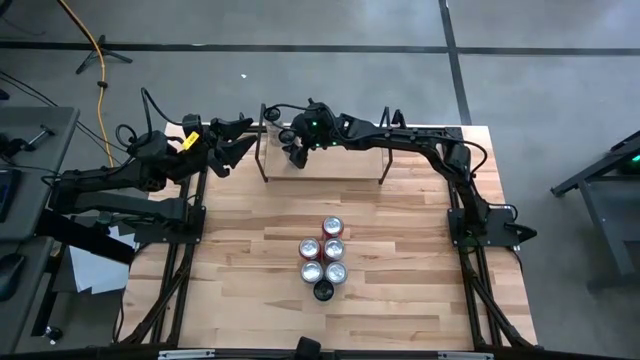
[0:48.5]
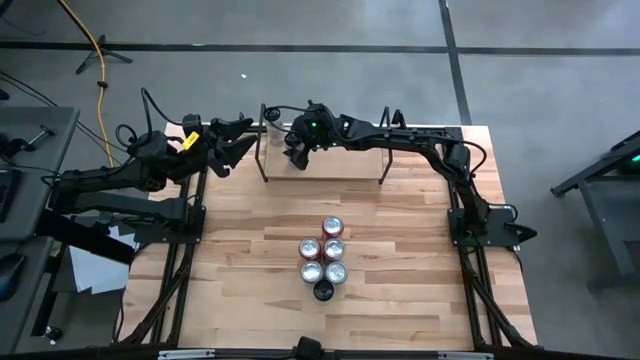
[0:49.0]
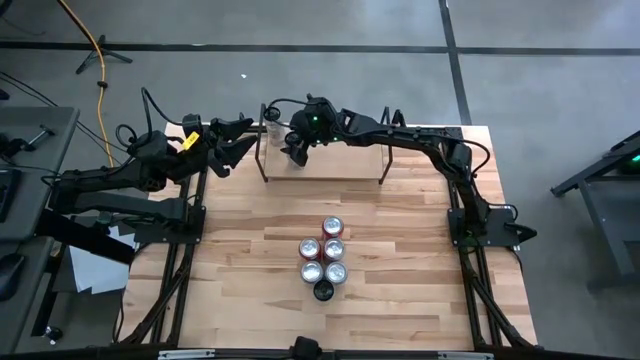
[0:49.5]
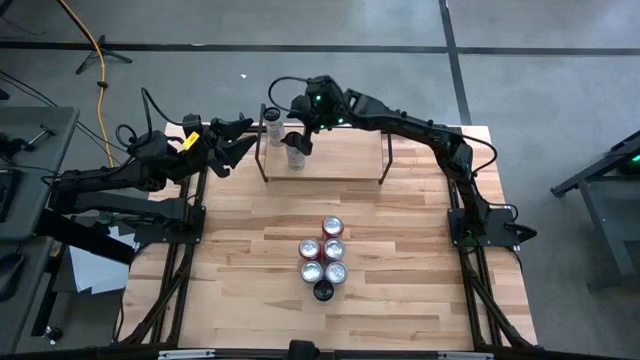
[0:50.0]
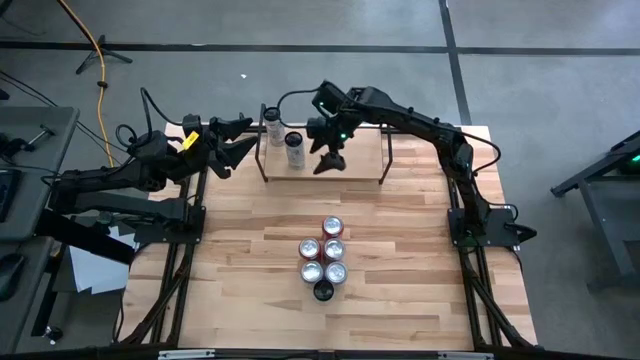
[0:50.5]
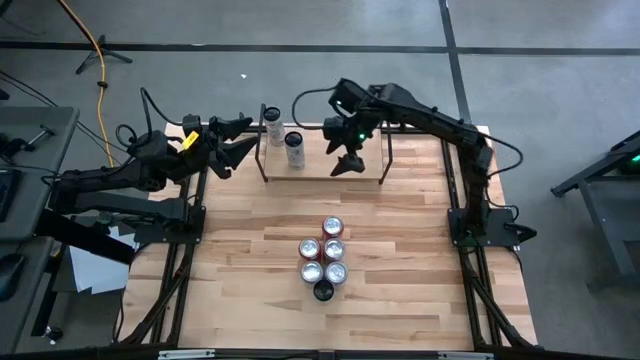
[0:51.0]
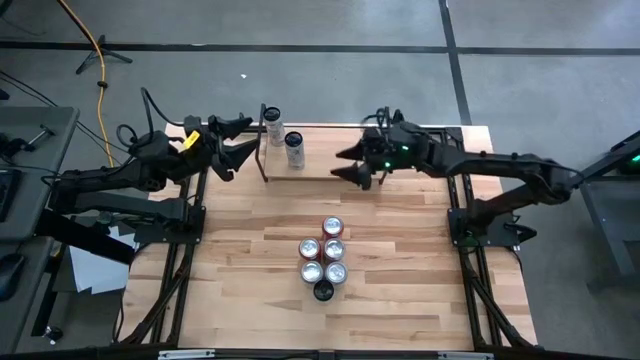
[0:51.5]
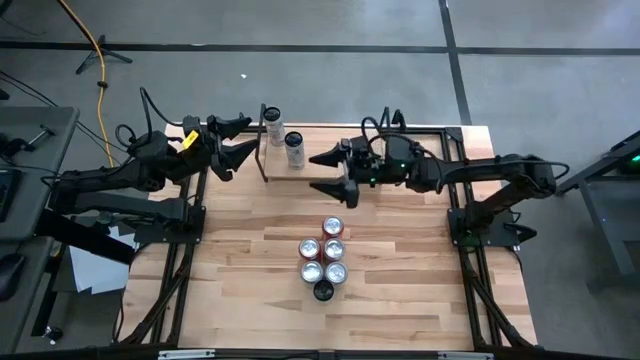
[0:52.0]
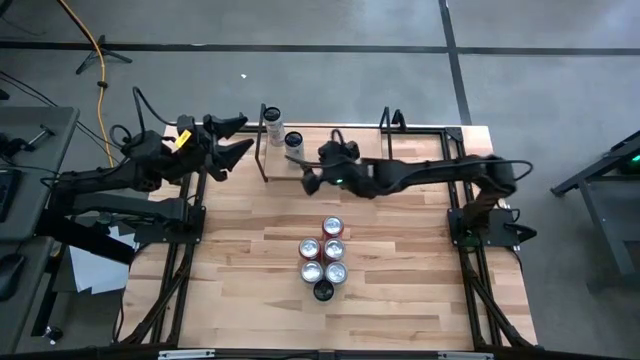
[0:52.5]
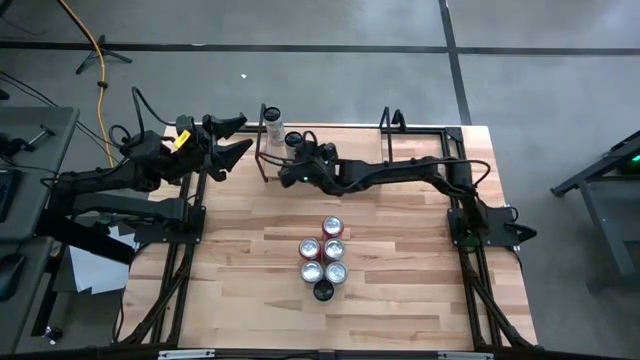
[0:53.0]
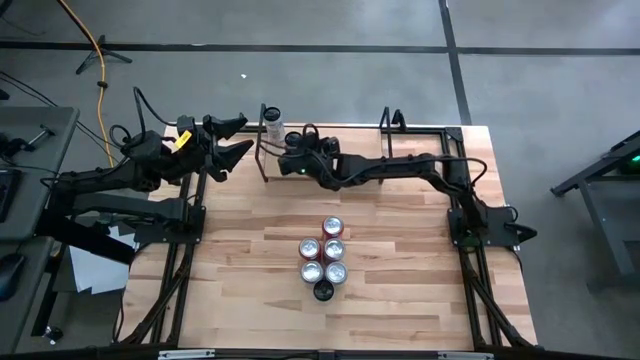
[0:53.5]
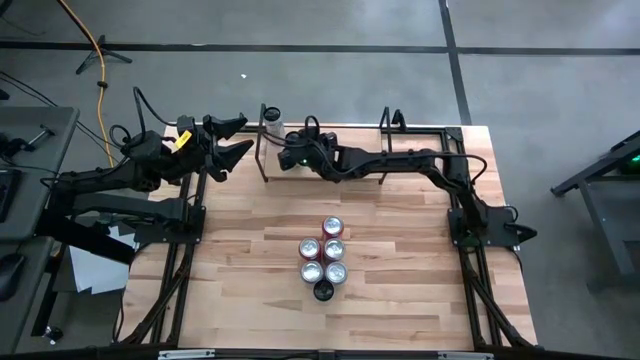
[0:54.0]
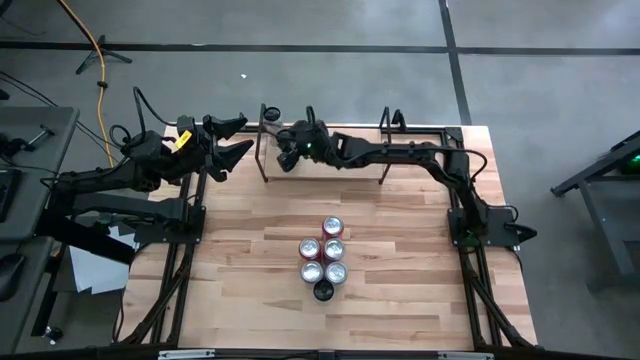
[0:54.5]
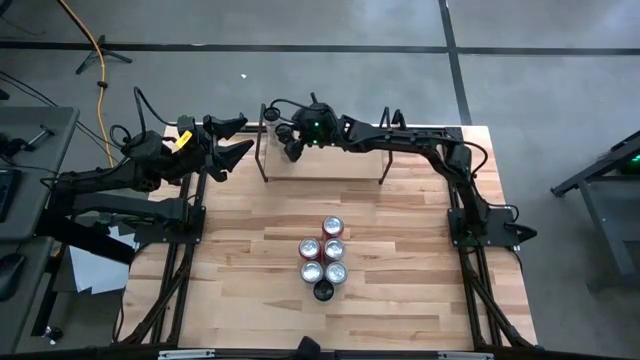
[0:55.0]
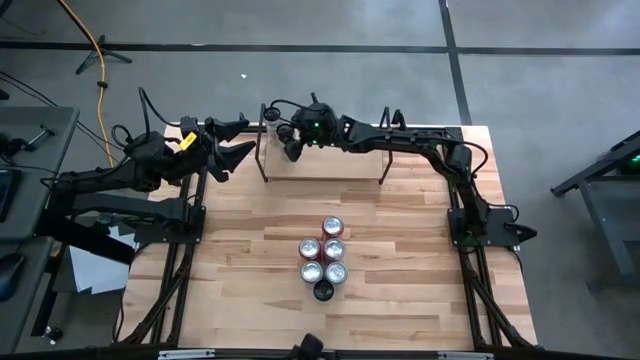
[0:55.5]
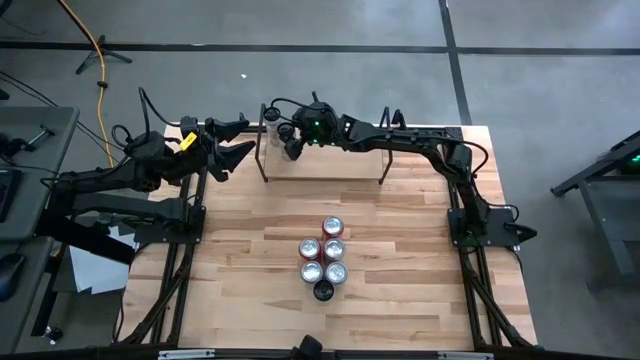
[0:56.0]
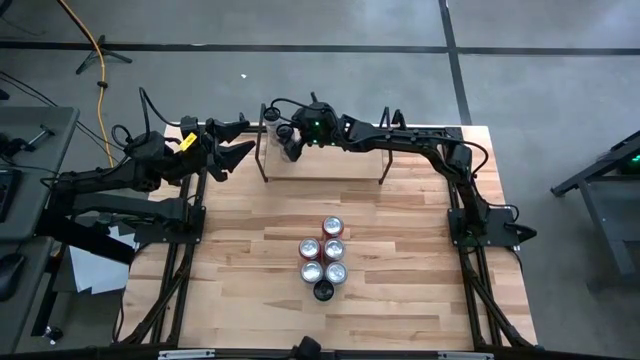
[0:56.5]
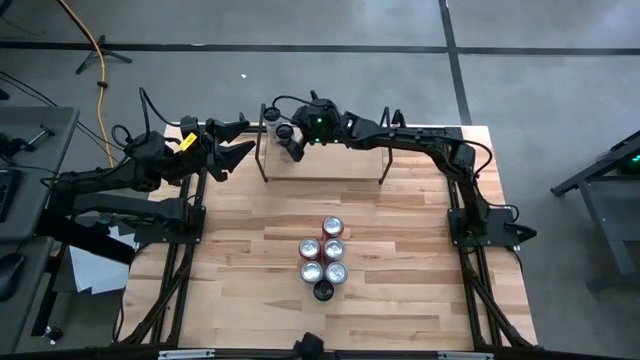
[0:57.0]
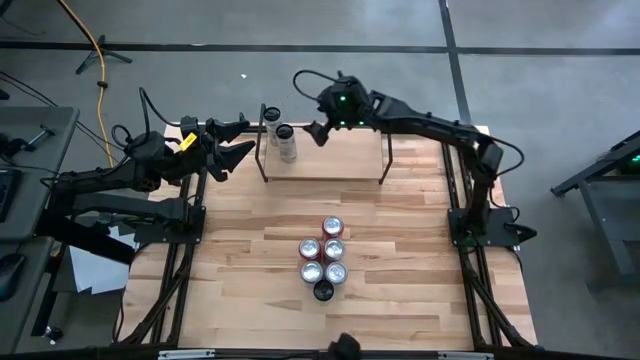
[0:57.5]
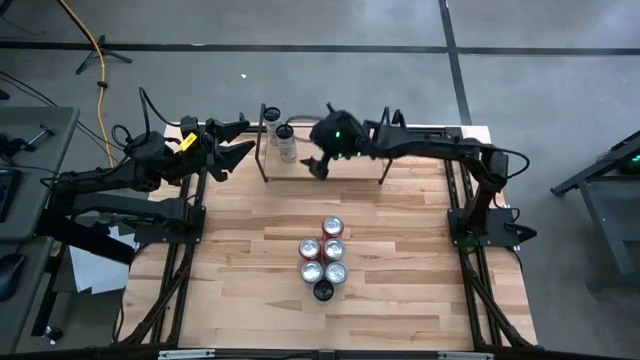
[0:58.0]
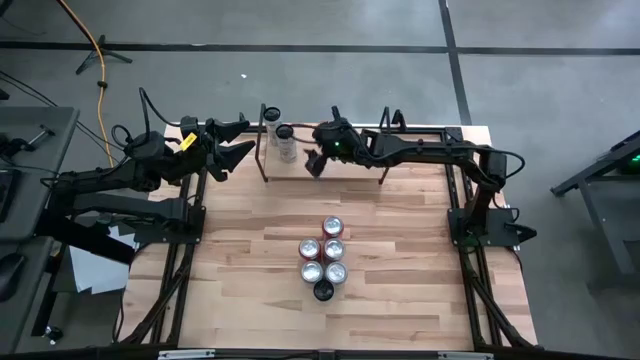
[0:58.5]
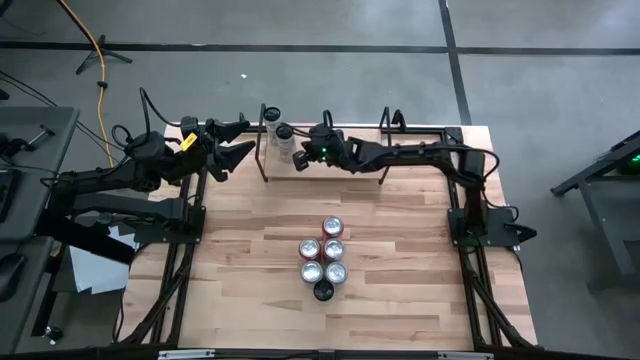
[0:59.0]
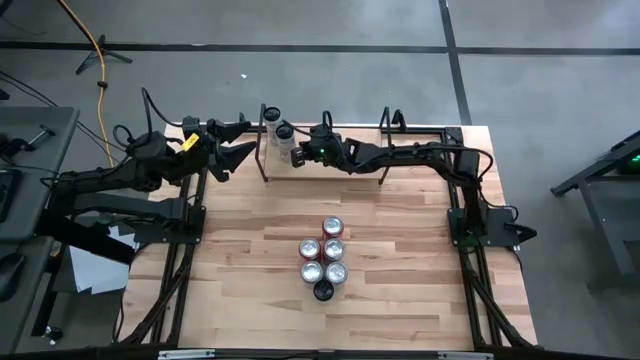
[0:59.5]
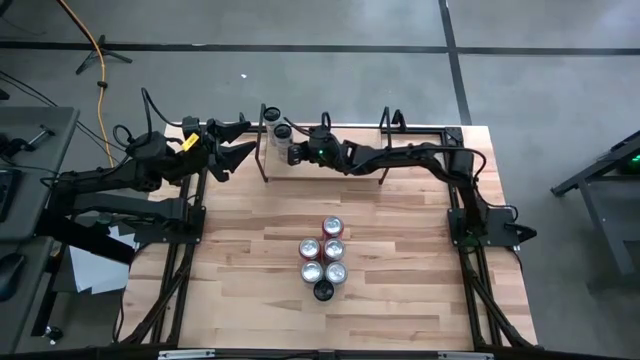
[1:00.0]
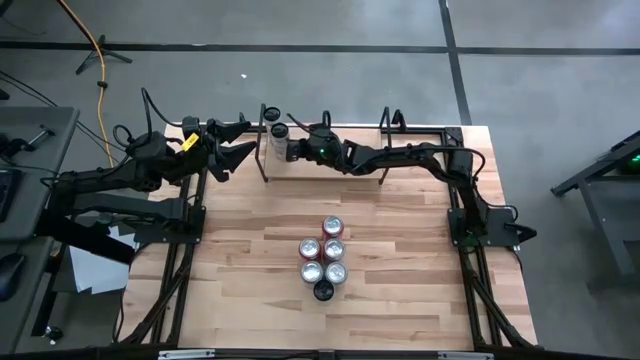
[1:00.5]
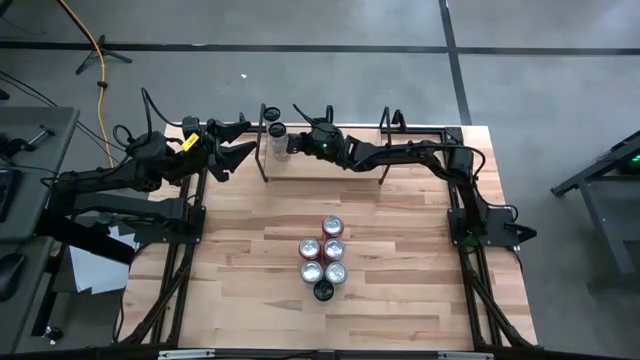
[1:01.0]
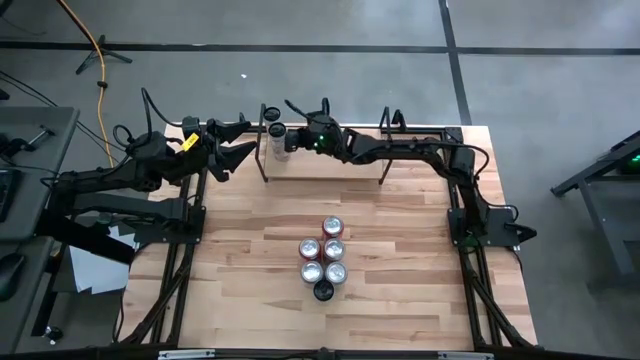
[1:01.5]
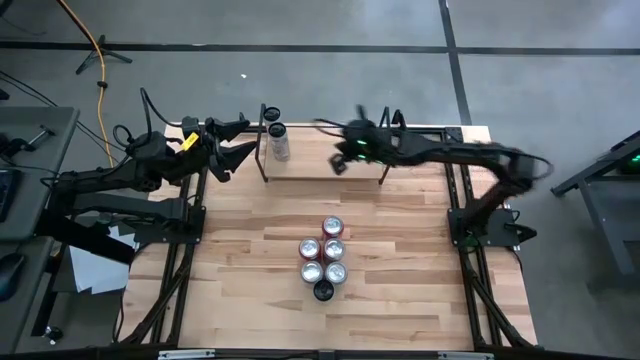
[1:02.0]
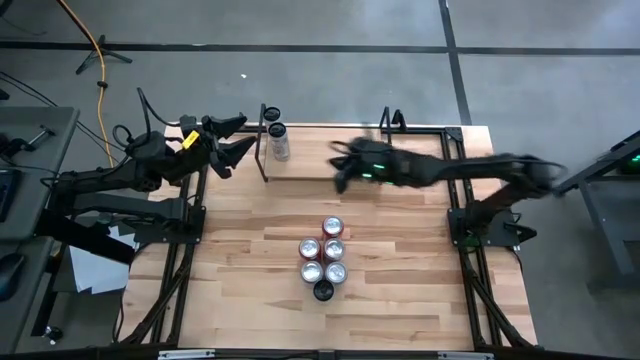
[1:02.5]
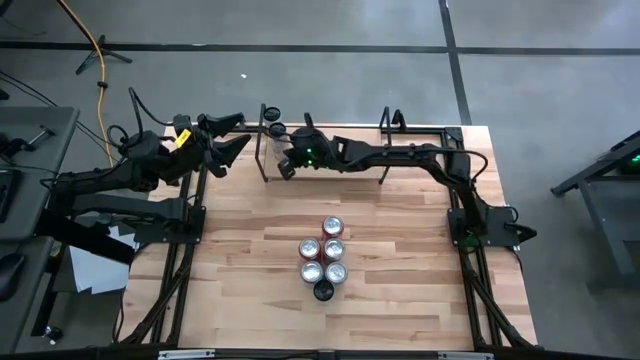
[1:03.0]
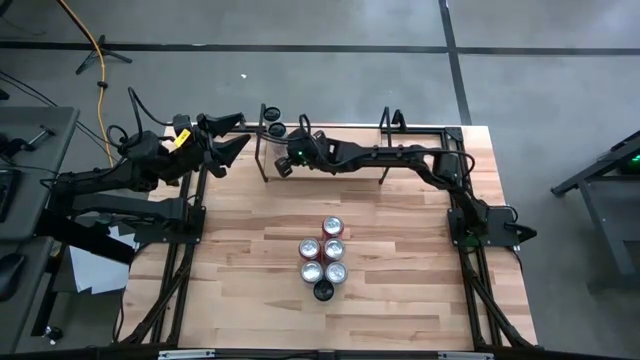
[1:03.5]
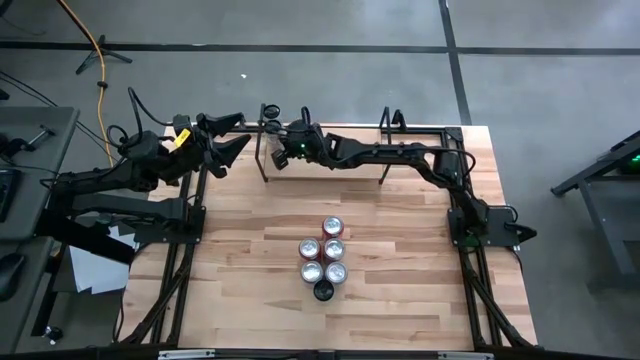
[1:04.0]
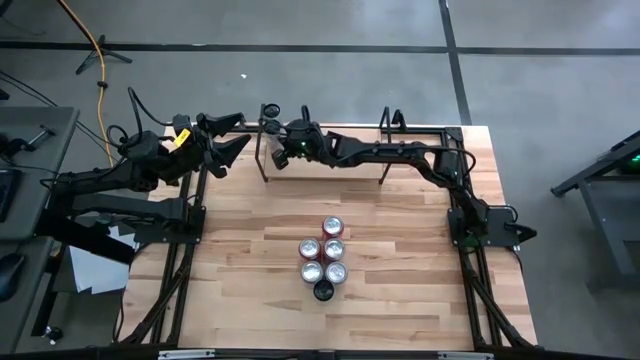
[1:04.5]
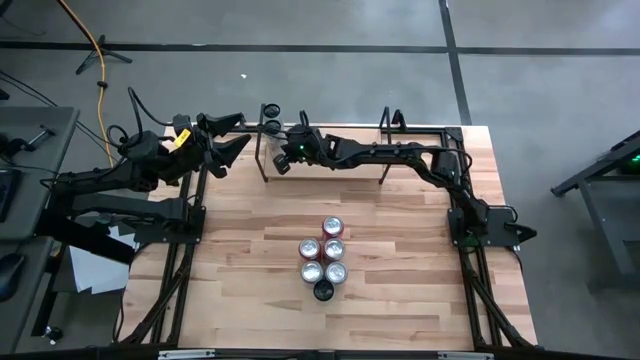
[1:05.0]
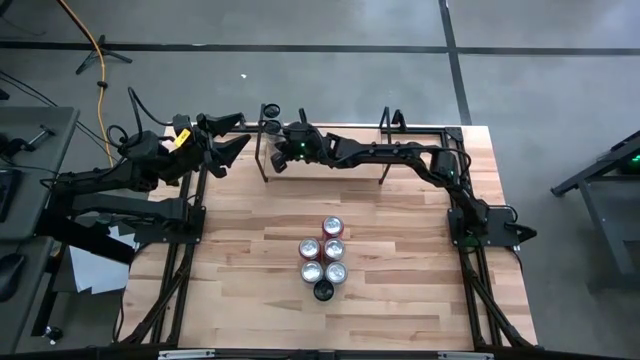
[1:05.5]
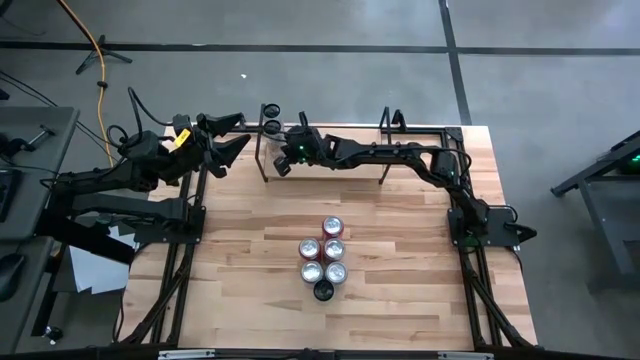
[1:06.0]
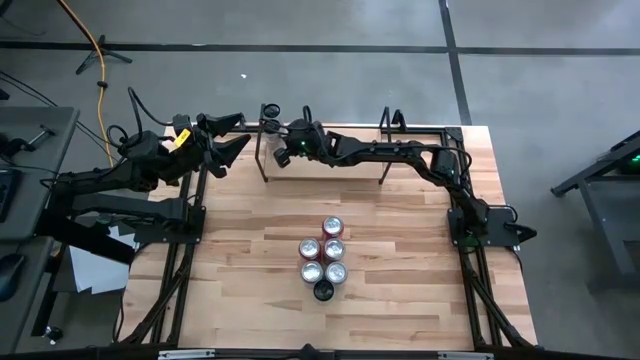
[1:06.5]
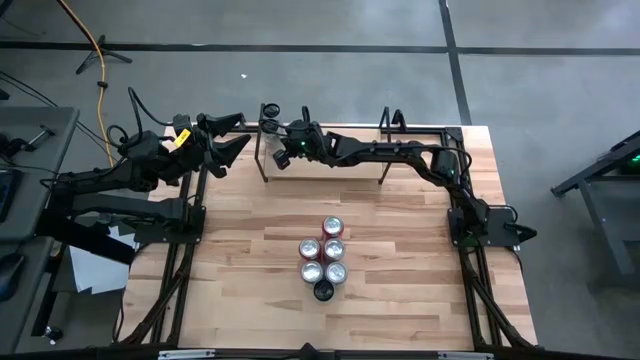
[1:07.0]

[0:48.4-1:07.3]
Task: Place canned beverage on shelf
Put the top white soda can aligned with the other white soda can on the shelf

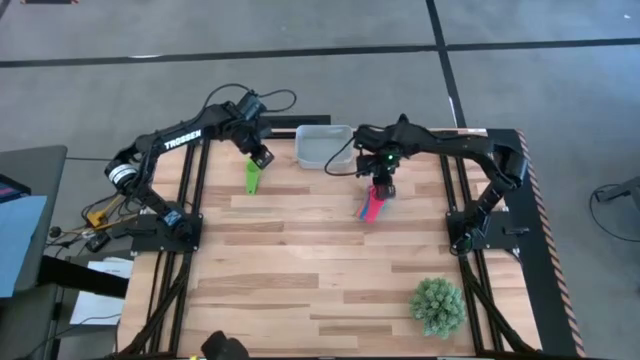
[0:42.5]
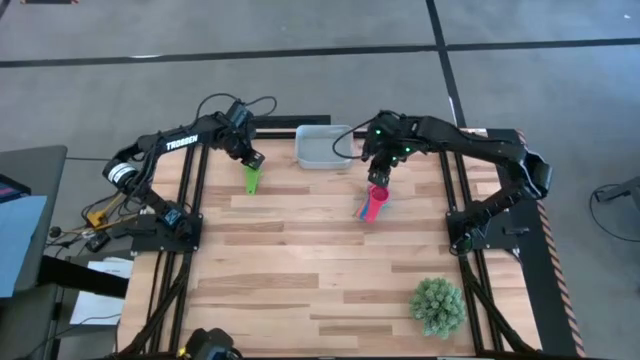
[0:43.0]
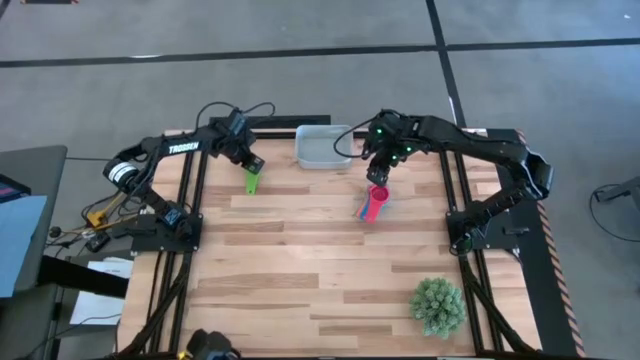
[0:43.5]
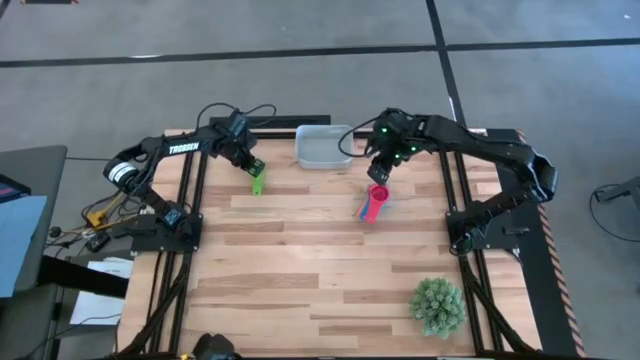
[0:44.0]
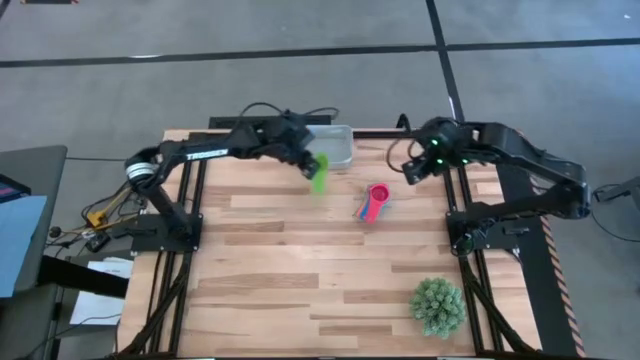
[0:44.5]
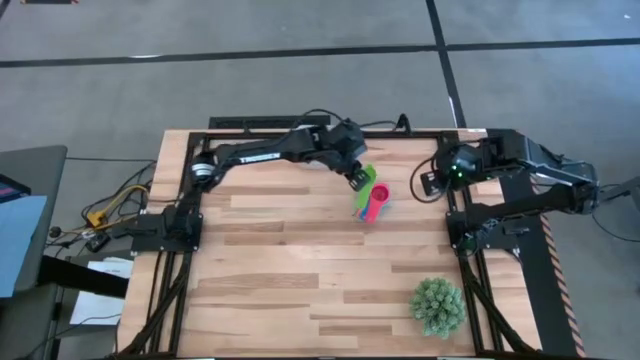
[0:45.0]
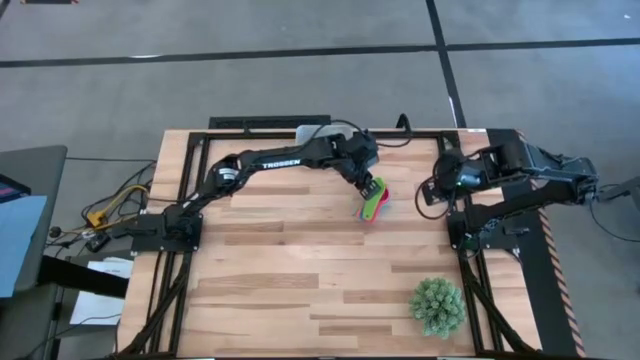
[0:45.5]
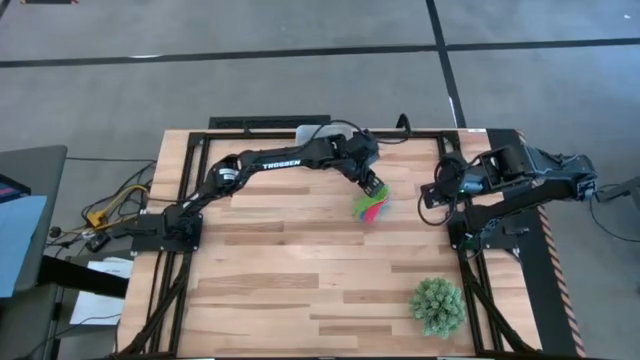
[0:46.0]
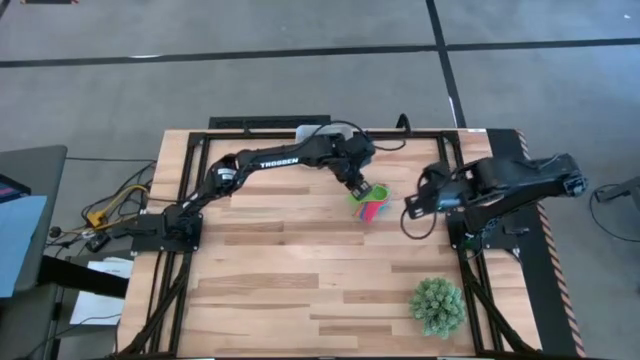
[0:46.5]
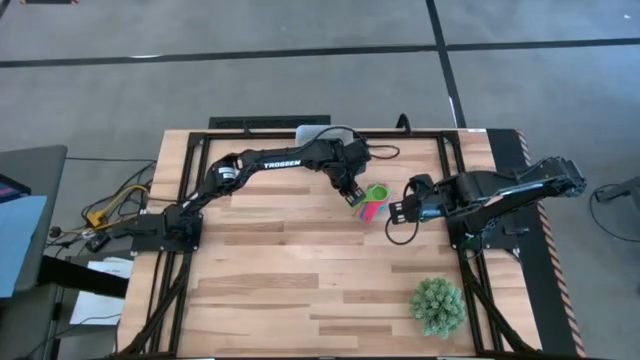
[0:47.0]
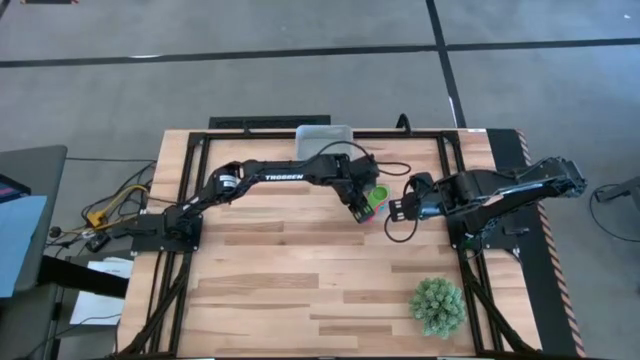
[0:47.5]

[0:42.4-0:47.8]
Task: Nest measuring cups in basket
Stack the green measuring cup on top of the red measuring cup
